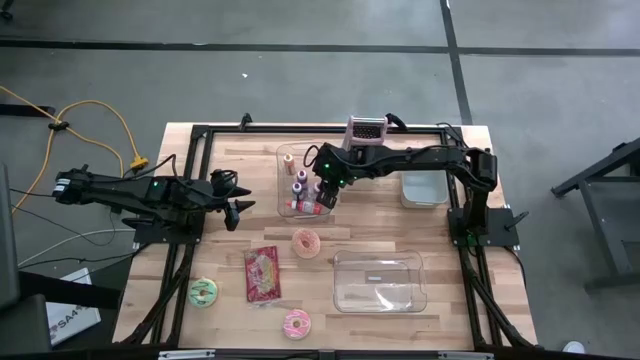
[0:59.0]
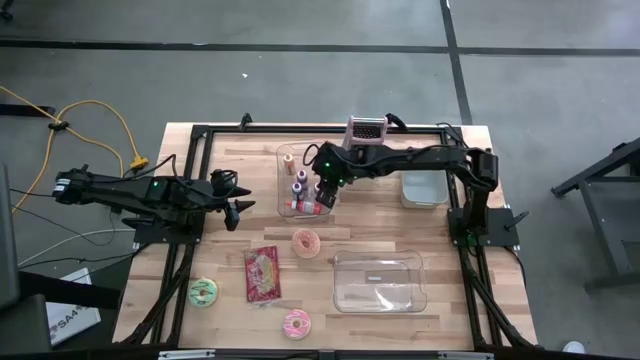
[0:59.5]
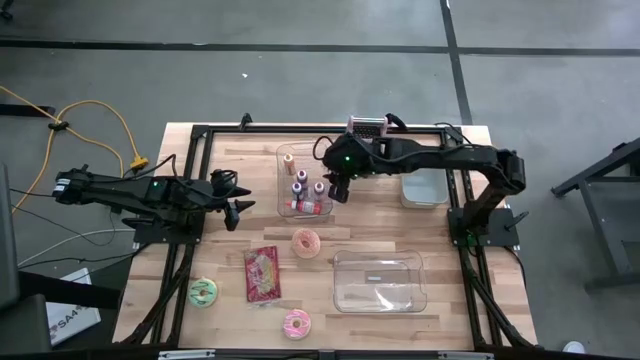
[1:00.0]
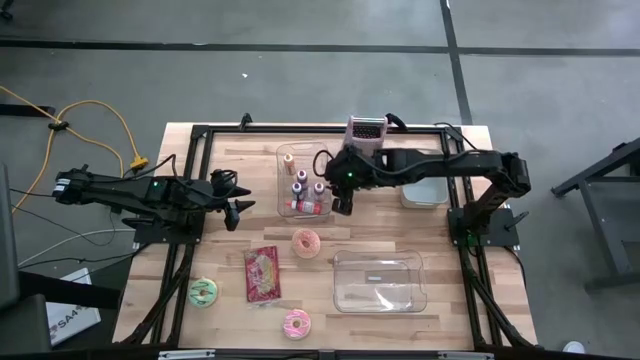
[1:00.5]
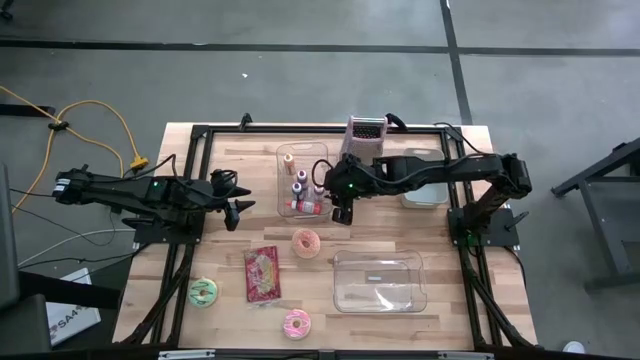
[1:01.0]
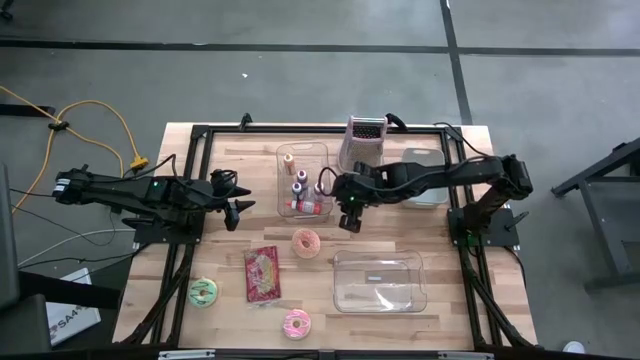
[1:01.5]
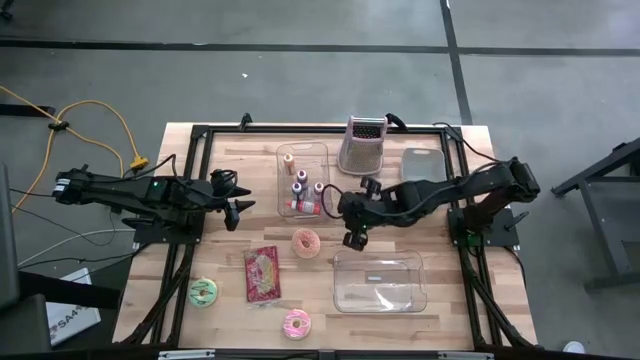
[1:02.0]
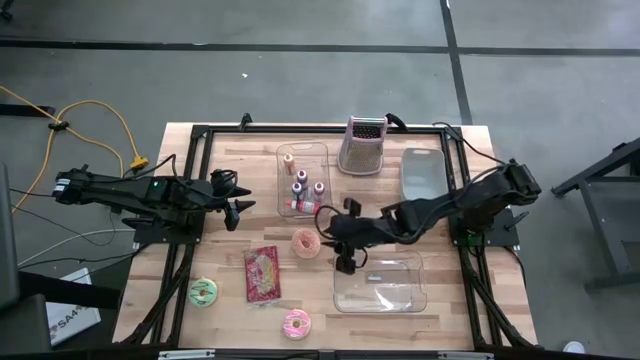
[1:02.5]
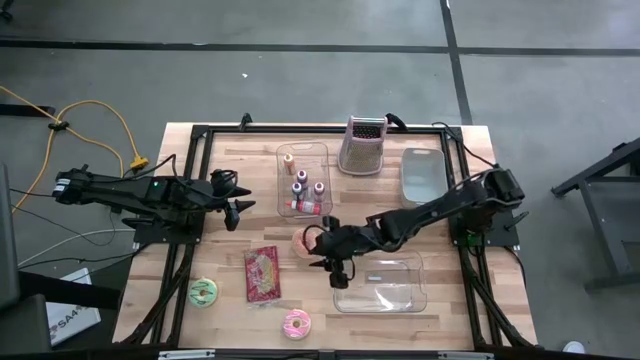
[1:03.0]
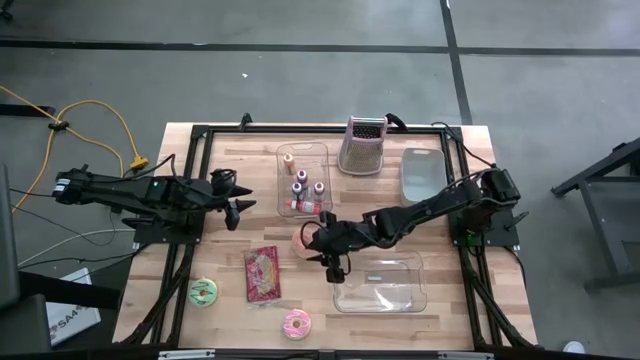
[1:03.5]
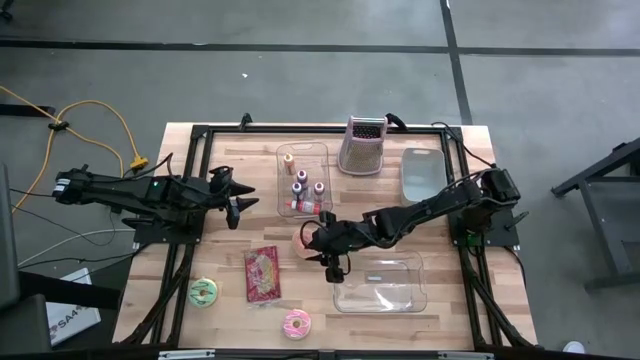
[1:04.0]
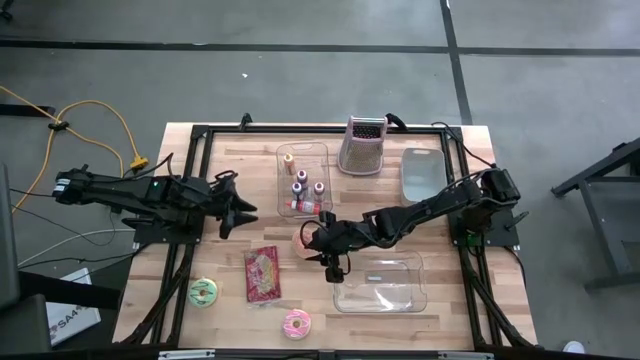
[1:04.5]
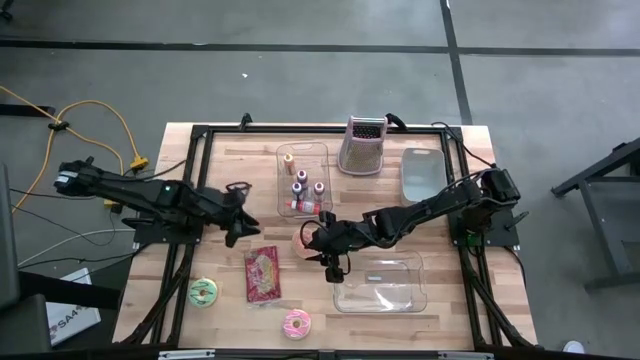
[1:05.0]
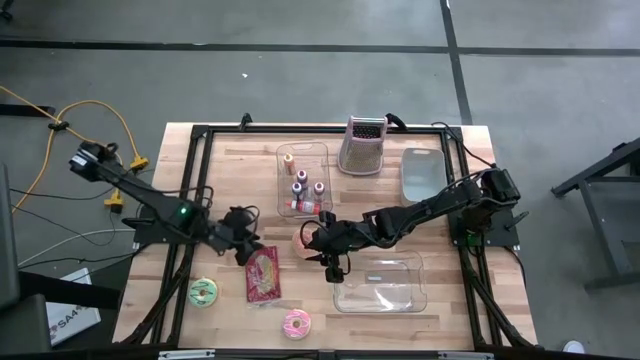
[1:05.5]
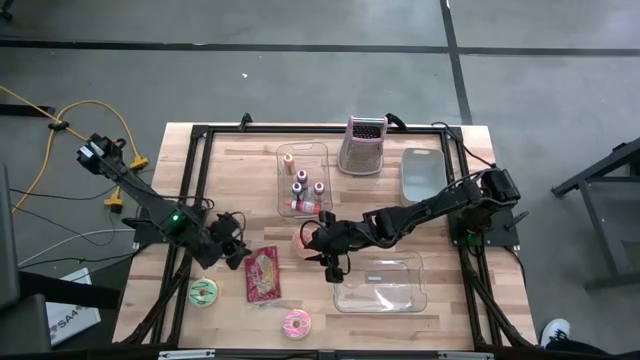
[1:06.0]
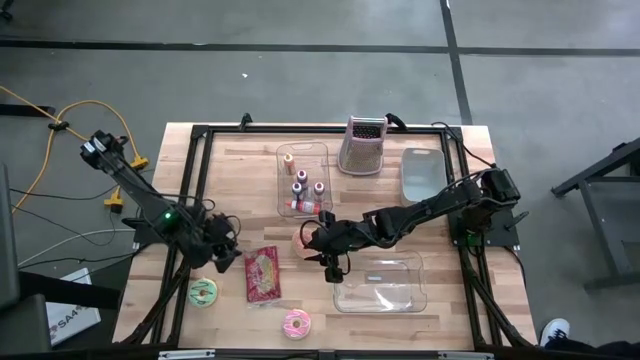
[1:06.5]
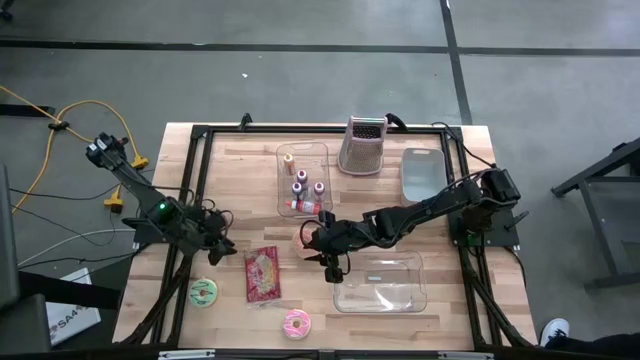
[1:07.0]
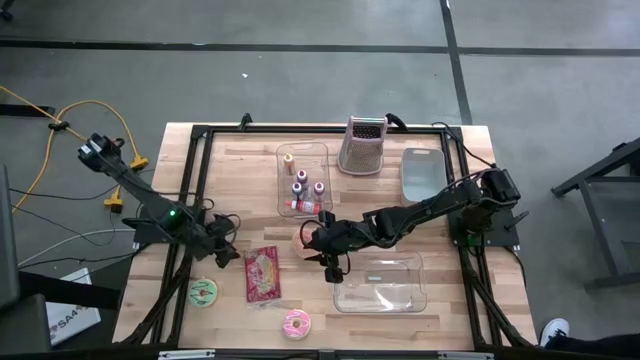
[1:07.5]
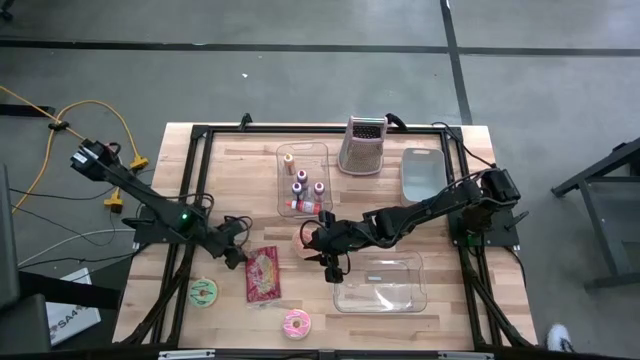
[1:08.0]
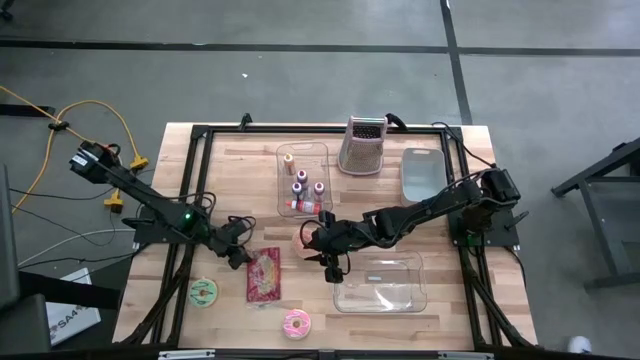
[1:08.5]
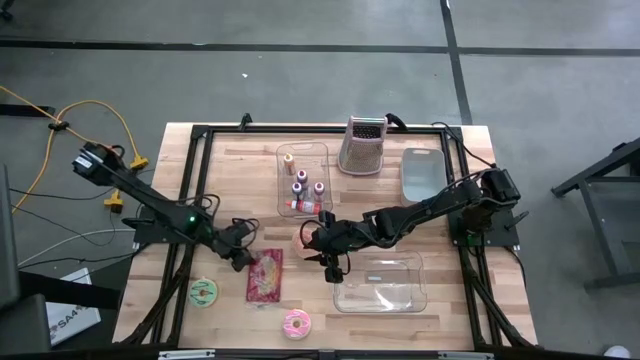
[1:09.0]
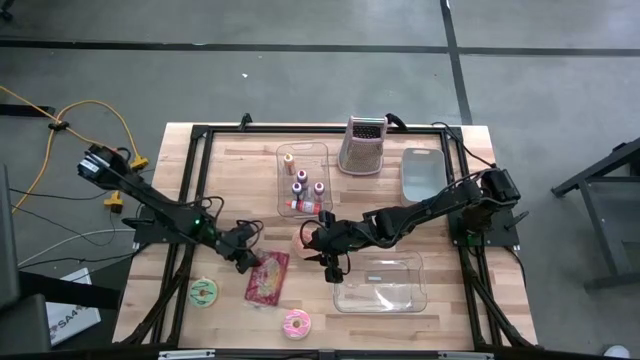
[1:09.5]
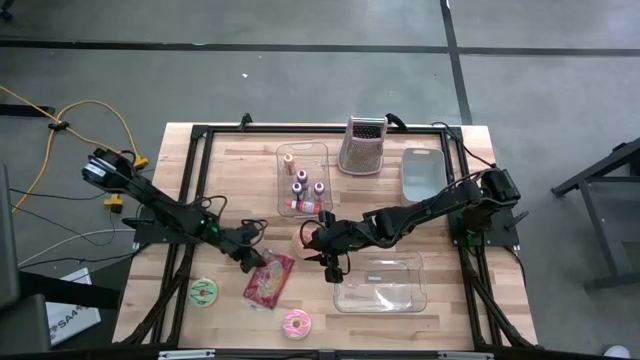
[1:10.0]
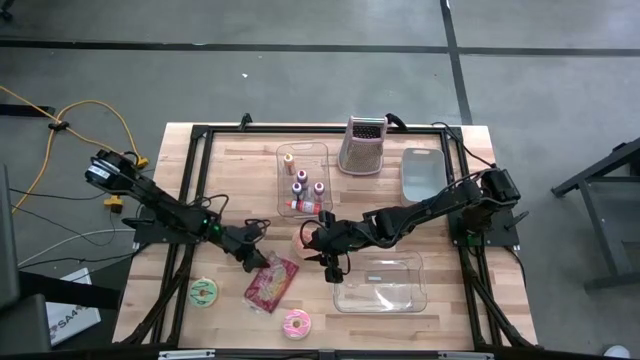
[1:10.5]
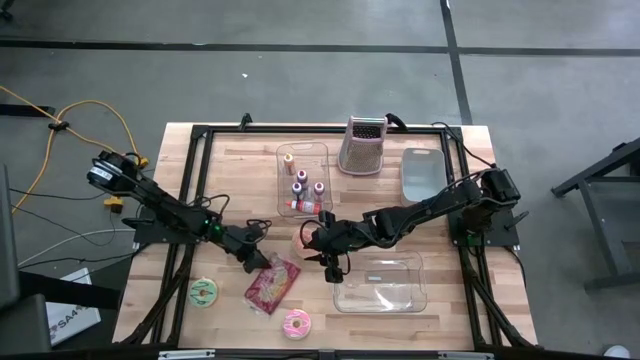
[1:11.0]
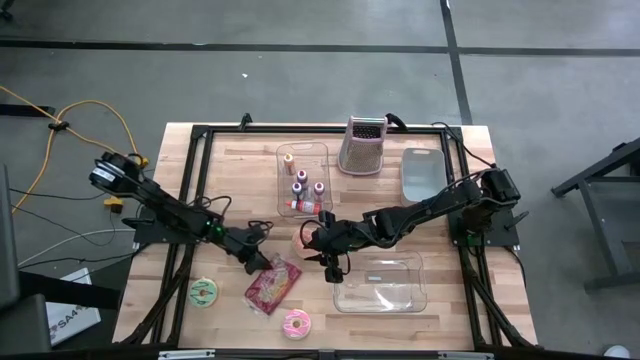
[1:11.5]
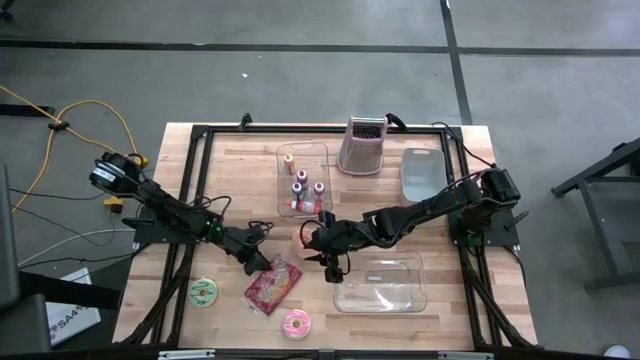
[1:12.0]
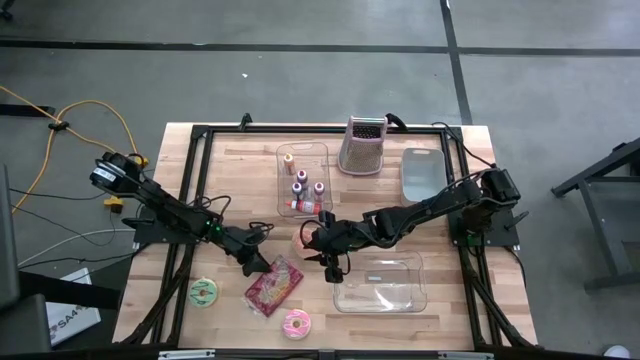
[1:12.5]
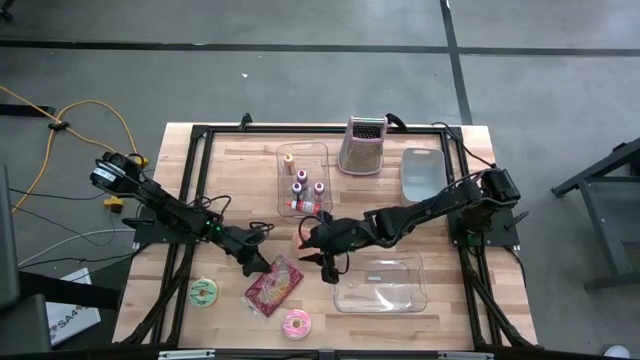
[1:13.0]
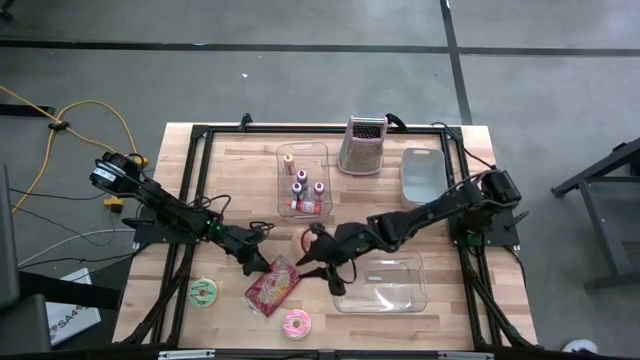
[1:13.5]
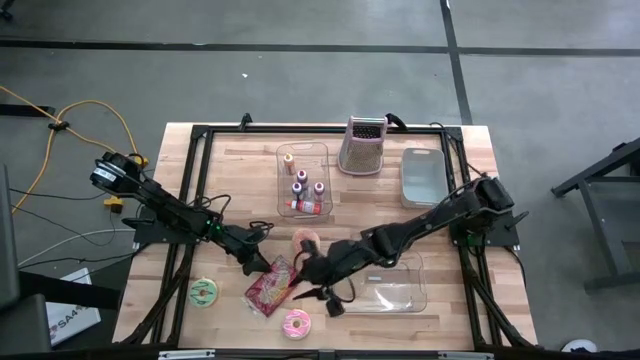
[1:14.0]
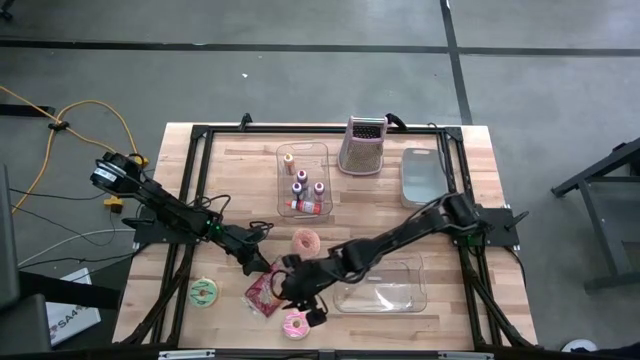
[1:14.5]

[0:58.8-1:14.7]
Put the popcorn bag into the bottom transparent bin
